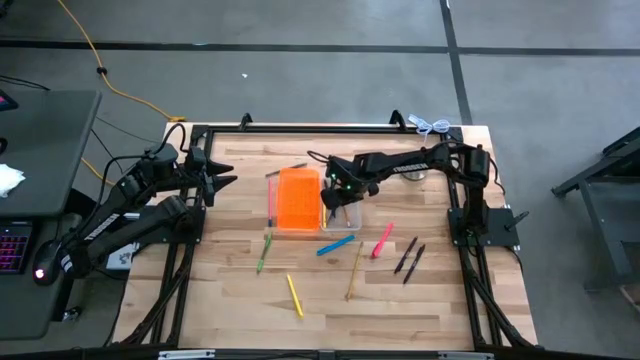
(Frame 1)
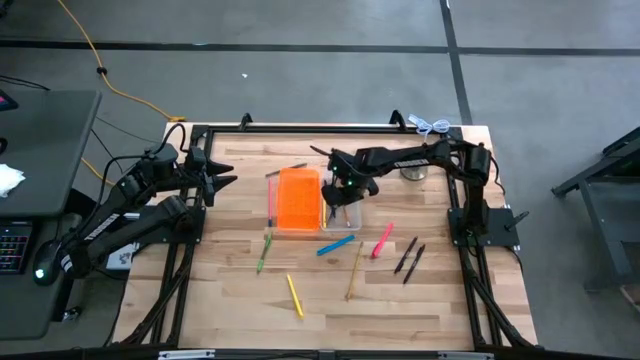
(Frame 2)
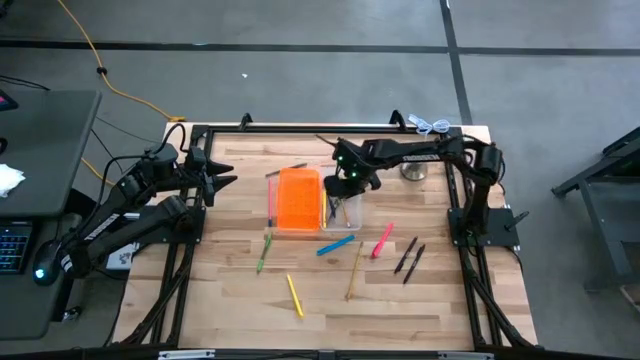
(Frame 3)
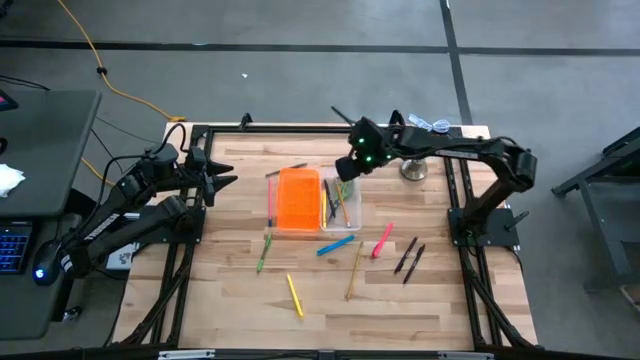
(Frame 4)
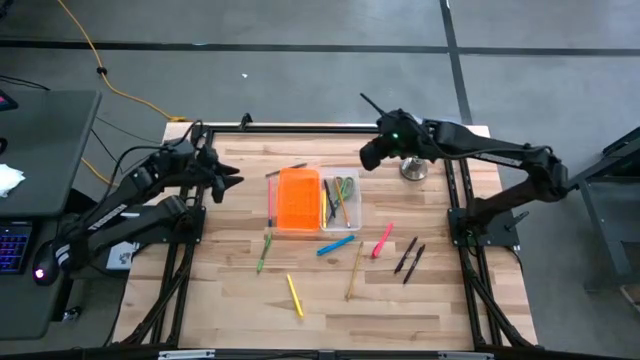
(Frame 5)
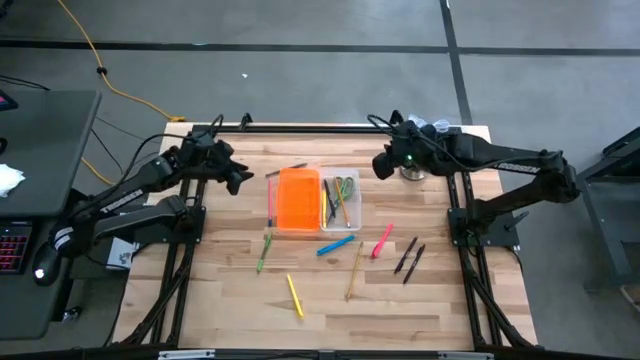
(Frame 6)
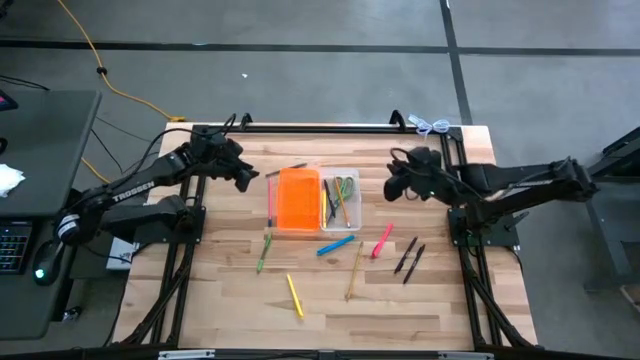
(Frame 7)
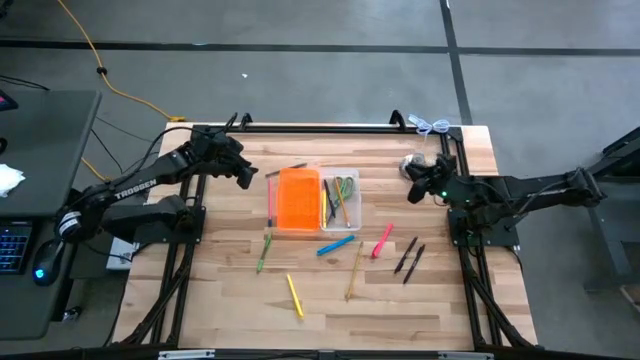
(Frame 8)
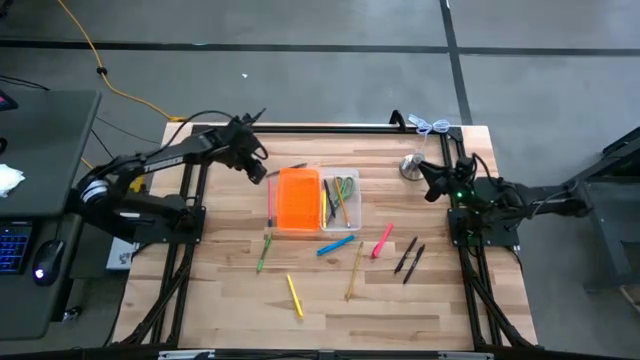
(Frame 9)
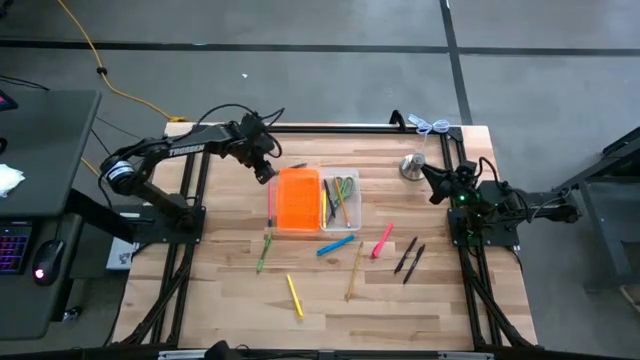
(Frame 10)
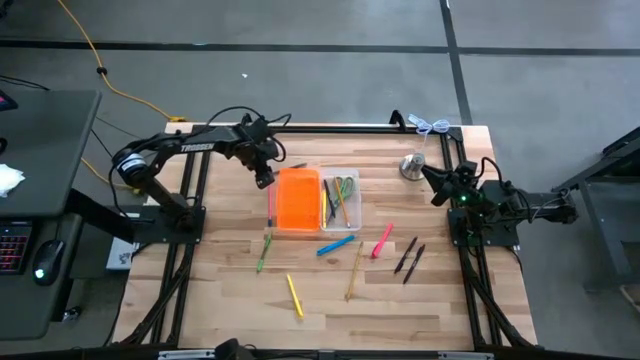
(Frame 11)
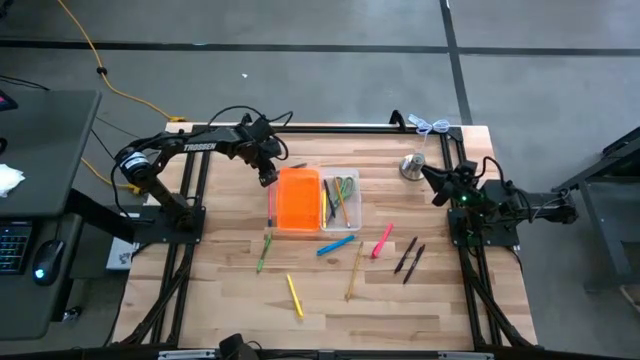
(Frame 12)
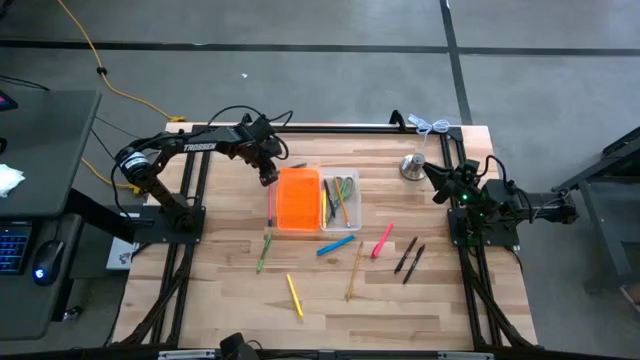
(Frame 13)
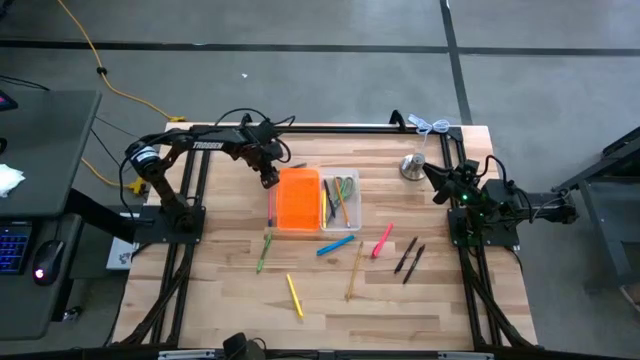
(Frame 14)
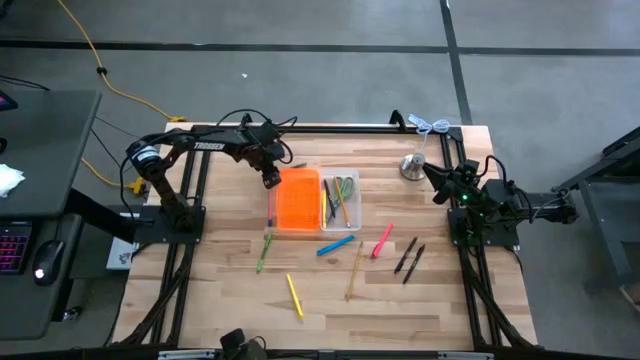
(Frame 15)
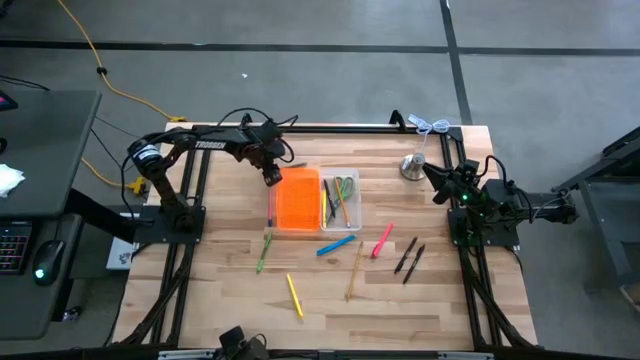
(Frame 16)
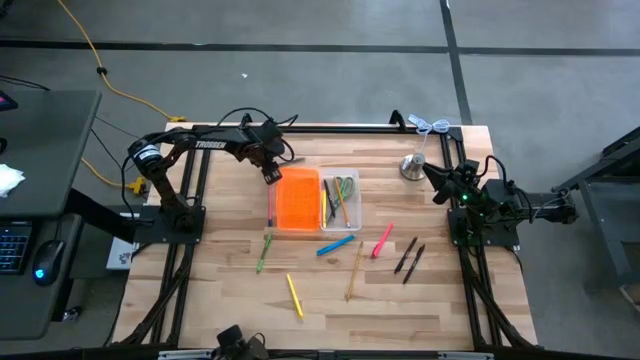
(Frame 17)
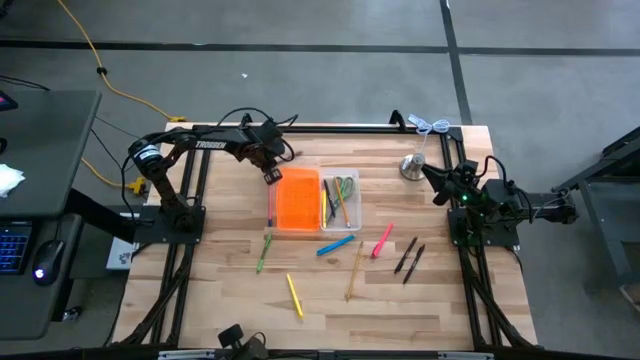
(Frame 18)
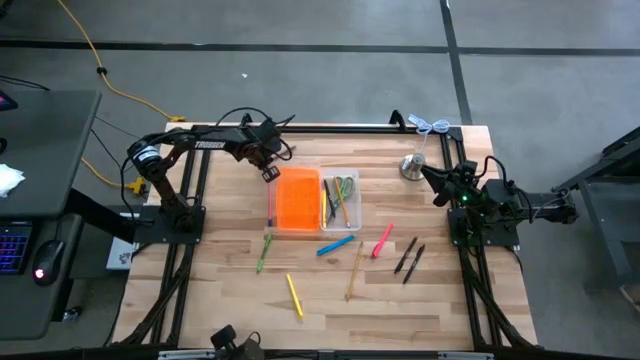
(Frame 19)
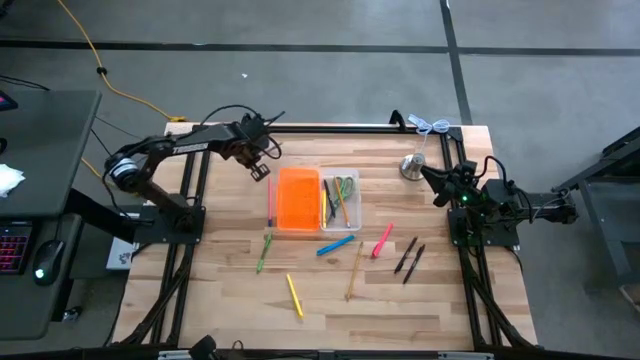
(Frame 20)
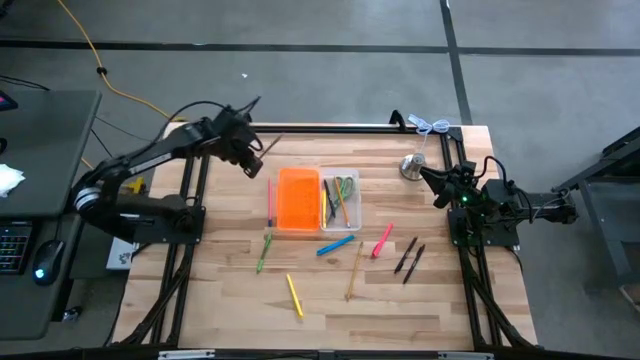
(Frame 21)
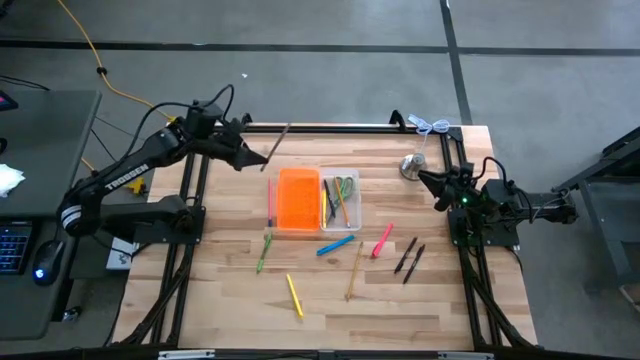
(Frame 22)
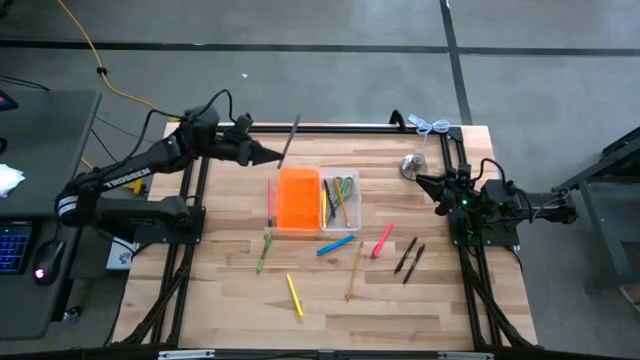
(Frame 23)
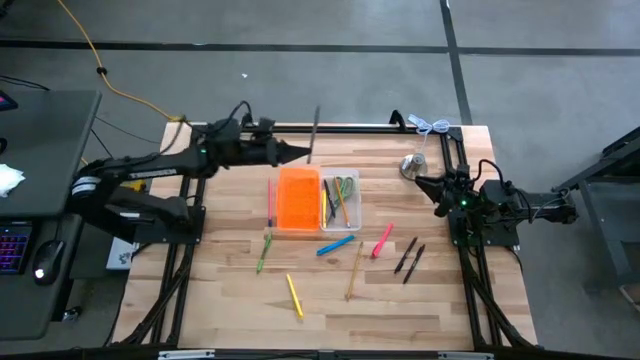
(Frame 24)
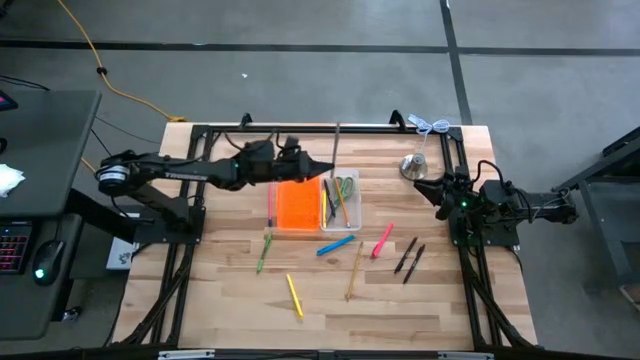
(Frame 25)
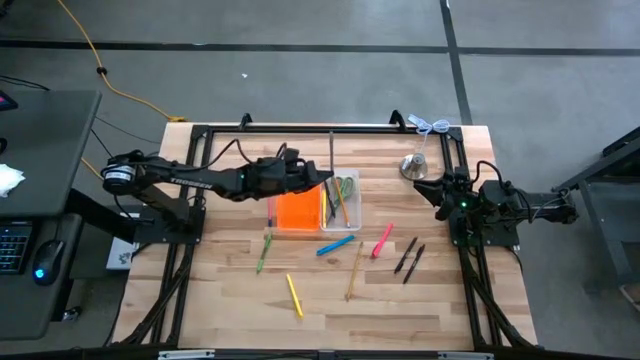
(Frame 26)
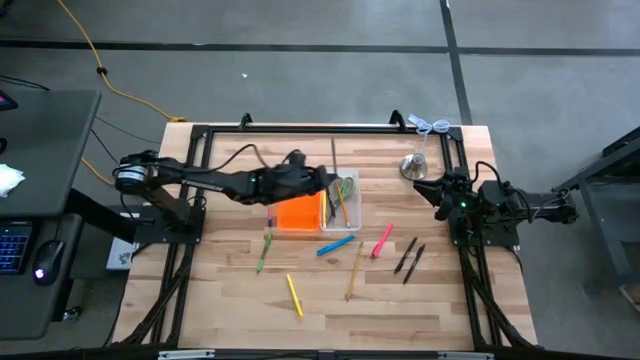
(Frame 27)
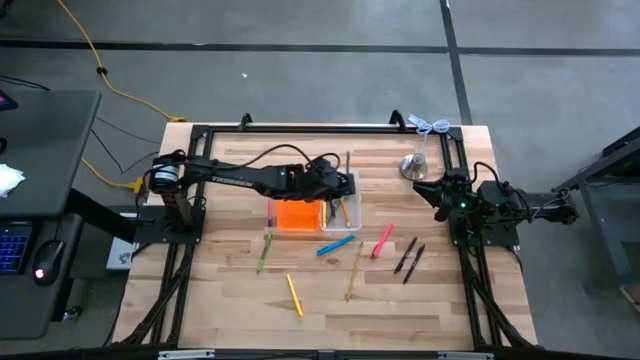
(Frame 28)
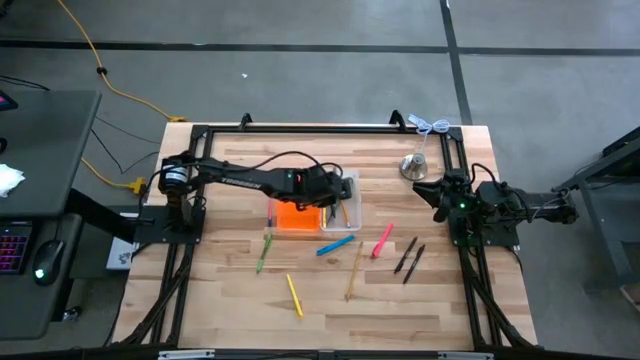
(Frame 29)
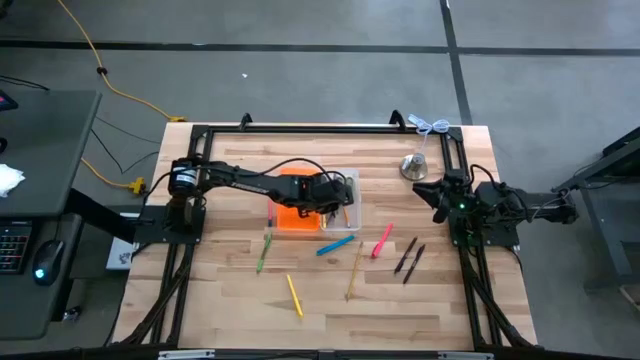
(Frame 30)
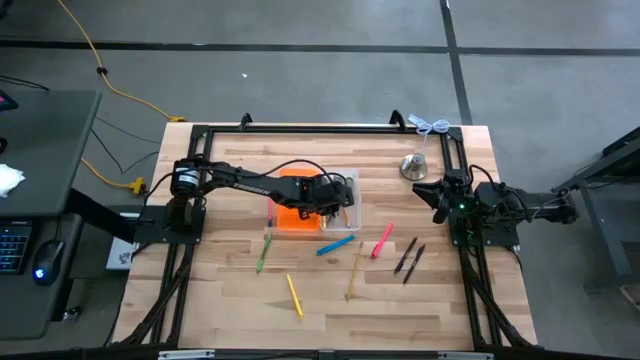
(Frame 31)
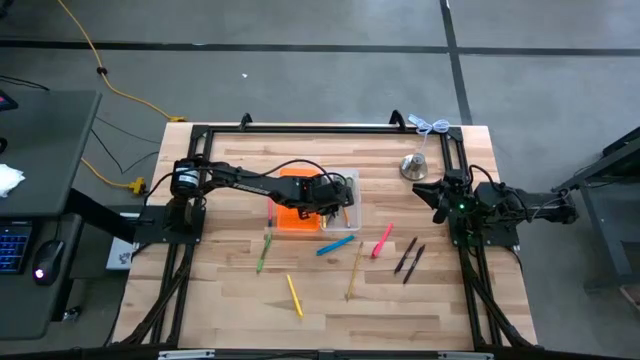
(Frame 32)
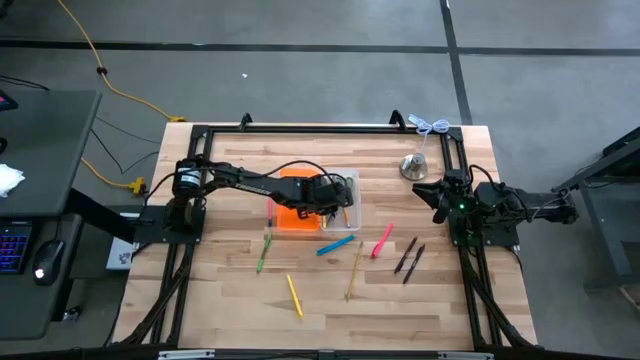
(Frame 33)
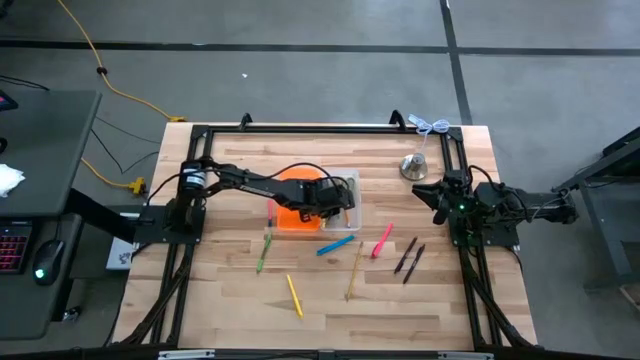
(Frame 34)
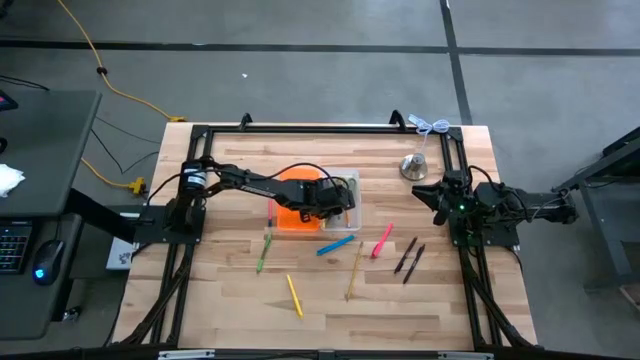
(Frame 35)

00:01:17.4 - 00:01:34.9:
Task: Pick & place school supplies into a supply box
Put the gray pen into the supply box

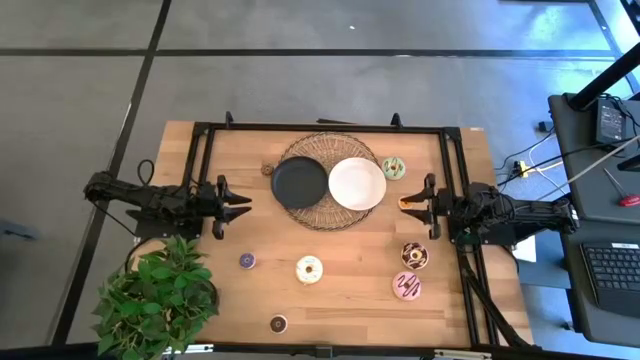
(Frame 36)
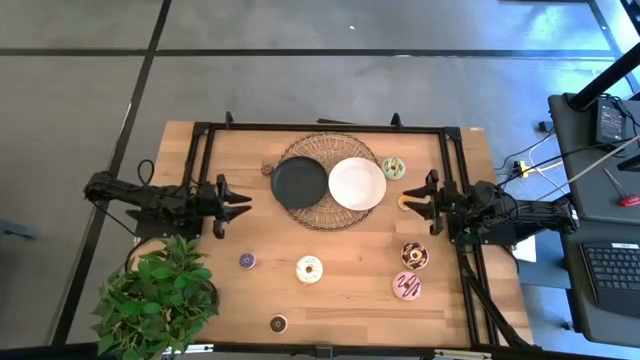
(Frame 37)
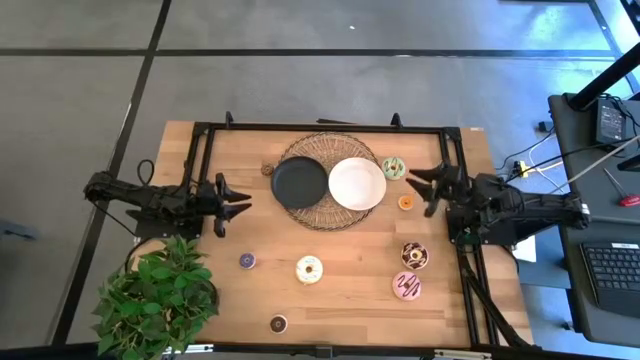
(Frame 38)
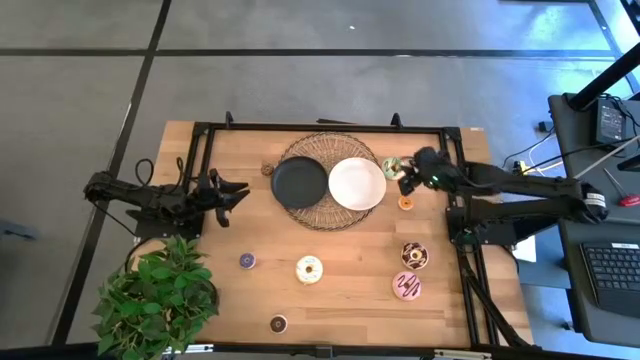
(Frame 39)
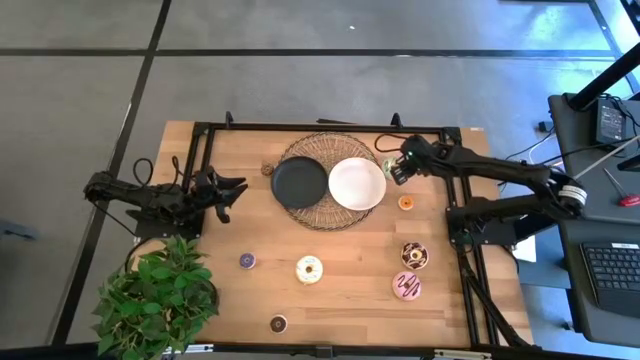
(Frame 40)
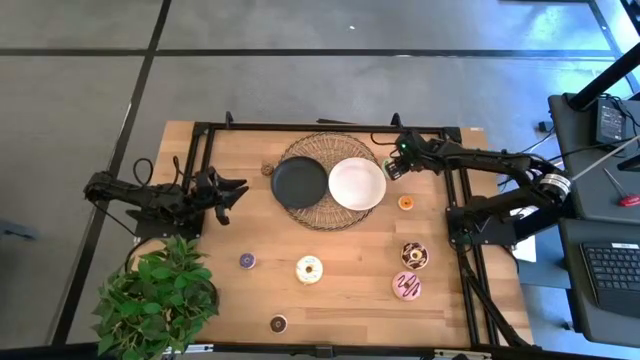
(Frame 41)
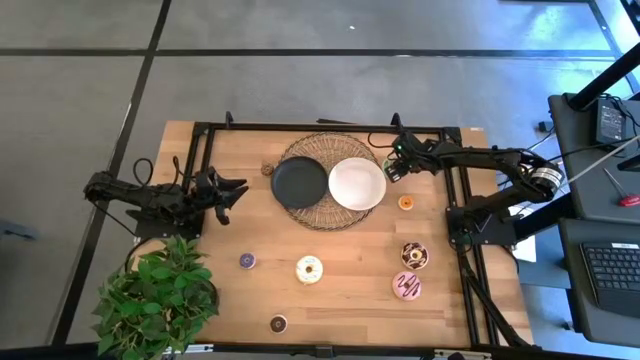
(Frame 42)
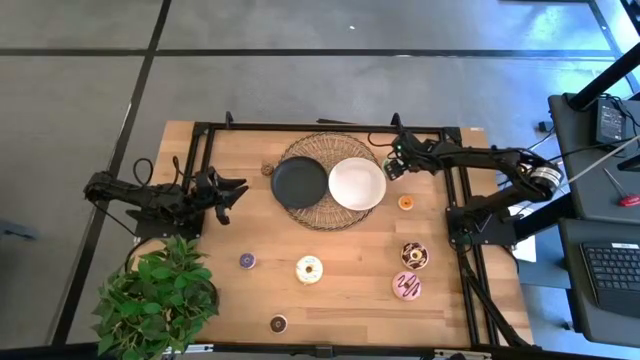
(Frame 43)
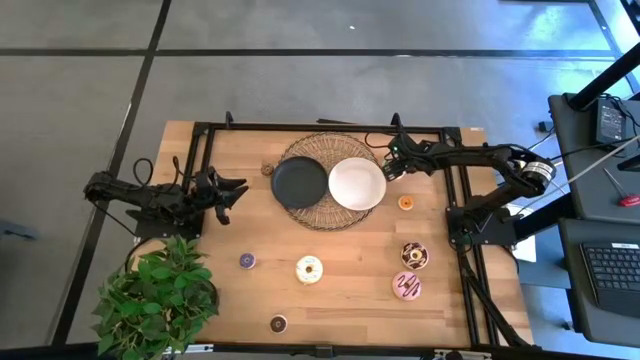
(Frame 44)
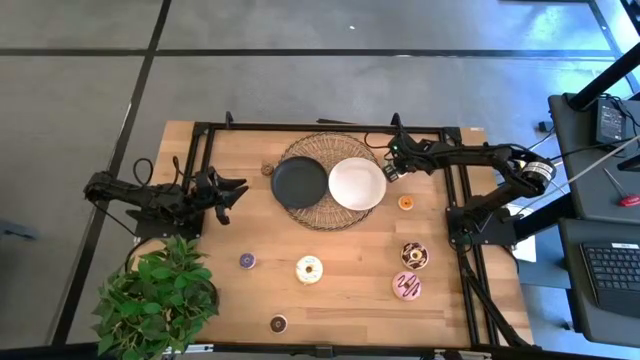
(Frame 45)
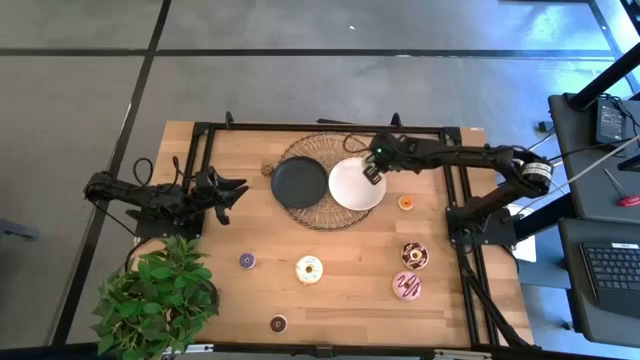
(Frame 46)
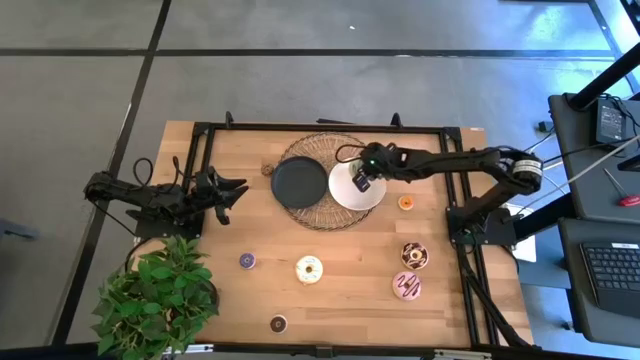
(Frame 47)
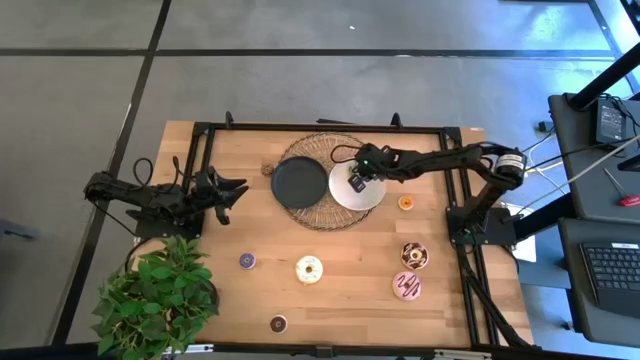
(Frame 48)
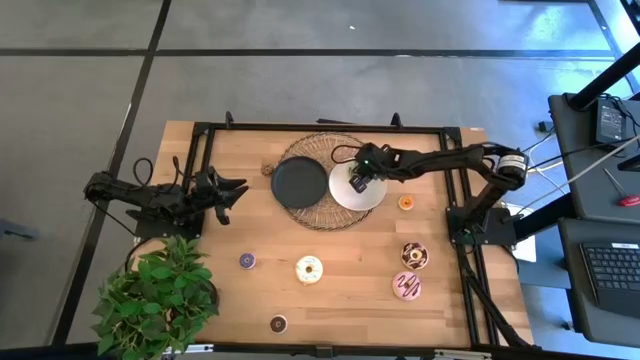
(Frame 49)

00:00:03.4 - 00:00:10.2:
Task: Pick & Place donuts
Put the green donut on the white plate
